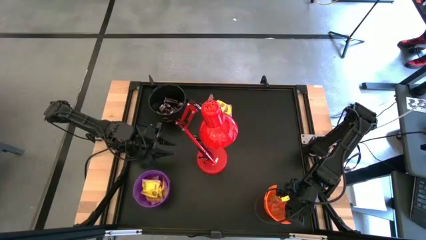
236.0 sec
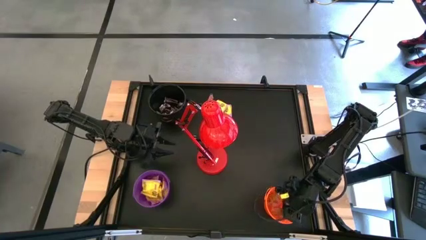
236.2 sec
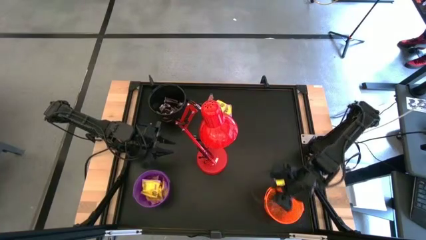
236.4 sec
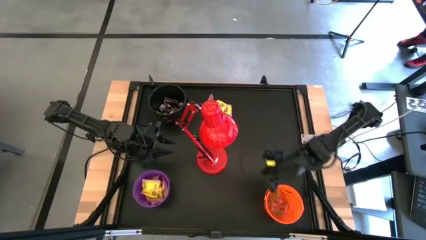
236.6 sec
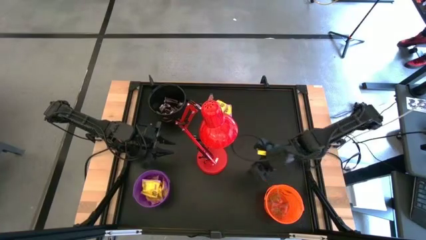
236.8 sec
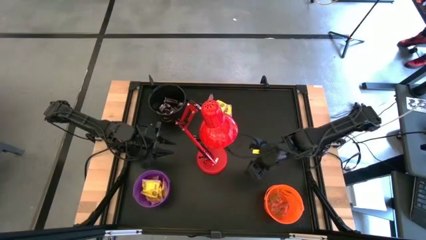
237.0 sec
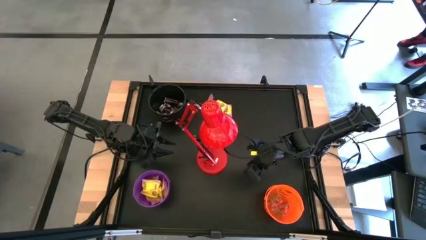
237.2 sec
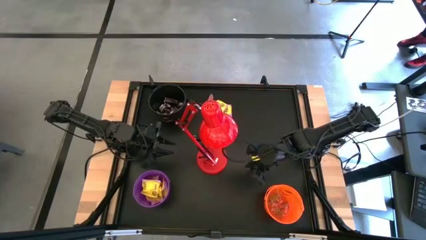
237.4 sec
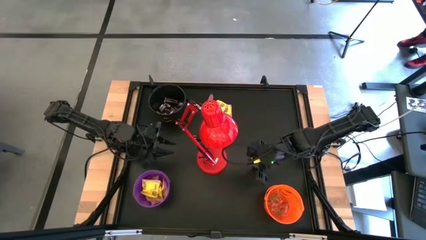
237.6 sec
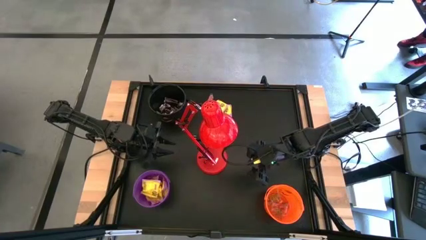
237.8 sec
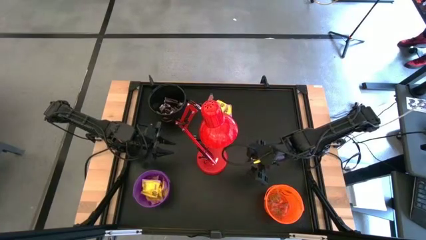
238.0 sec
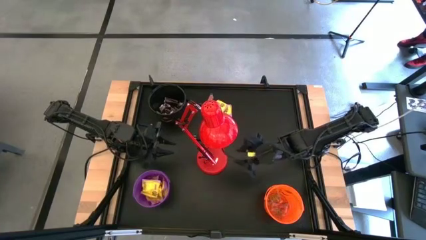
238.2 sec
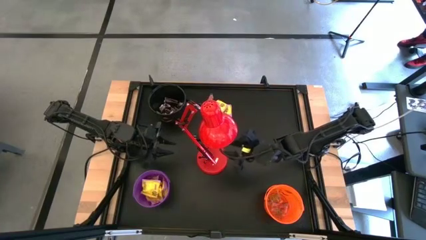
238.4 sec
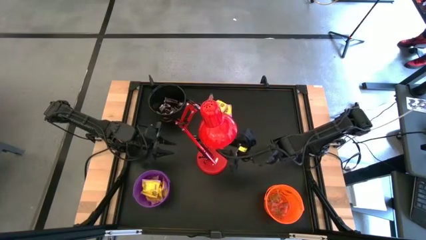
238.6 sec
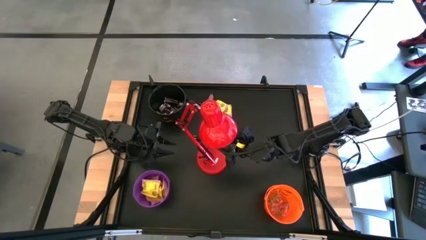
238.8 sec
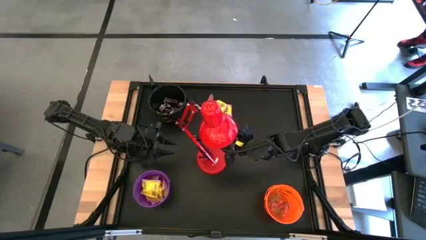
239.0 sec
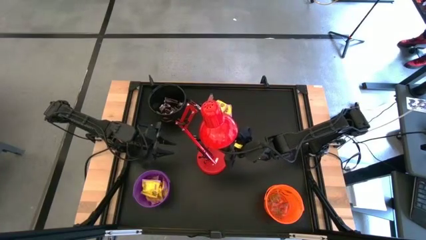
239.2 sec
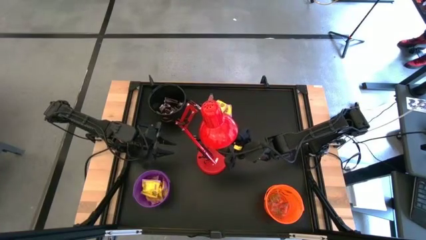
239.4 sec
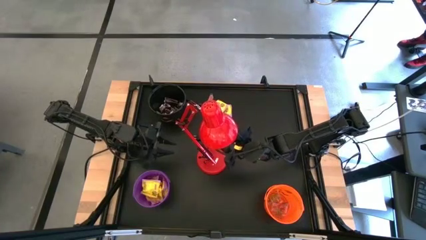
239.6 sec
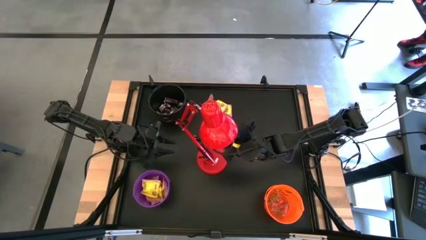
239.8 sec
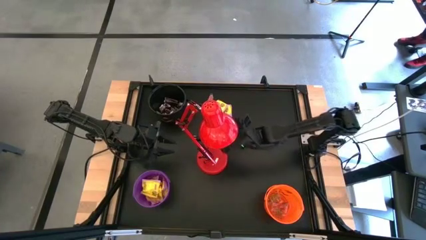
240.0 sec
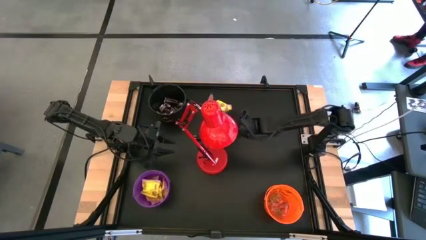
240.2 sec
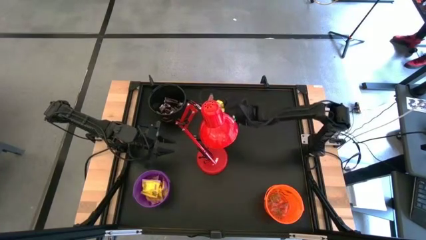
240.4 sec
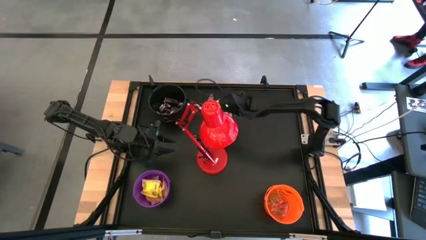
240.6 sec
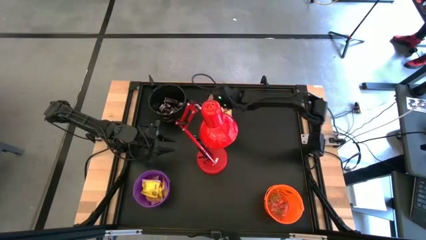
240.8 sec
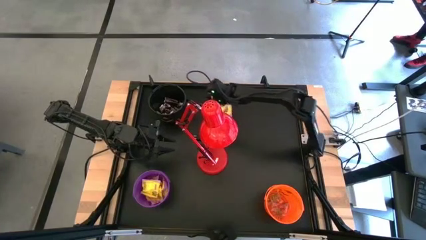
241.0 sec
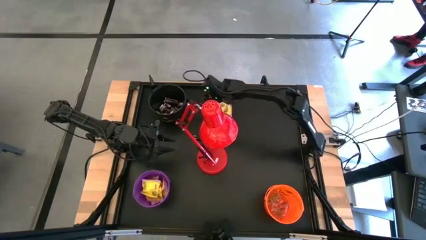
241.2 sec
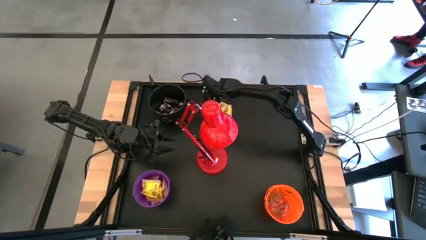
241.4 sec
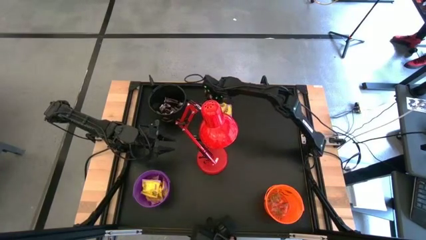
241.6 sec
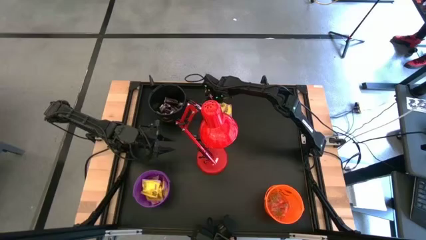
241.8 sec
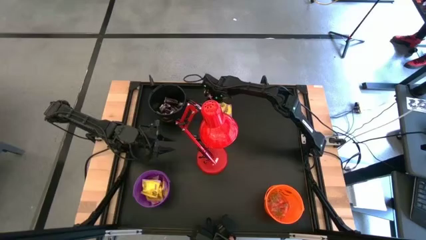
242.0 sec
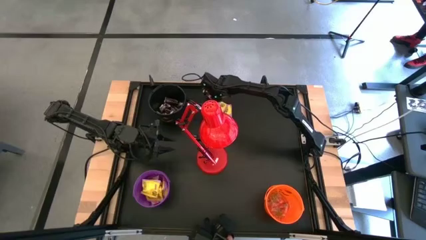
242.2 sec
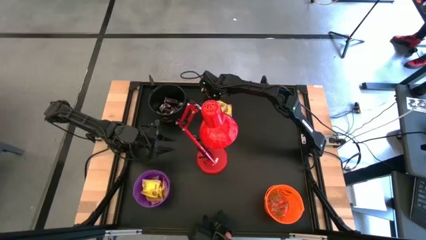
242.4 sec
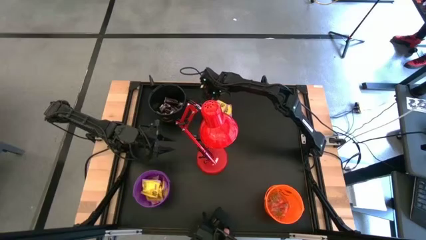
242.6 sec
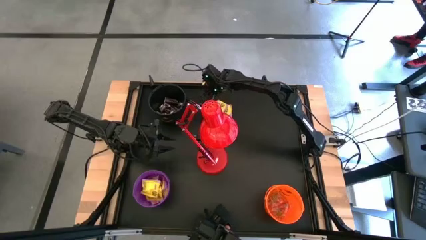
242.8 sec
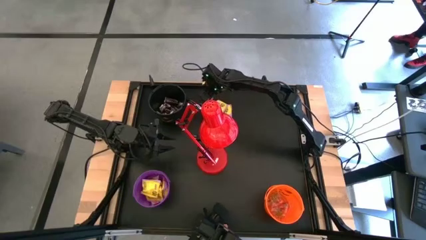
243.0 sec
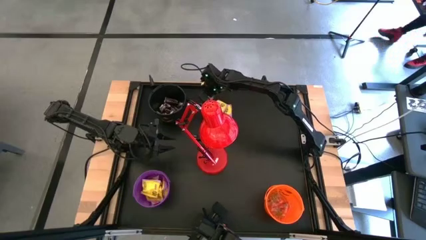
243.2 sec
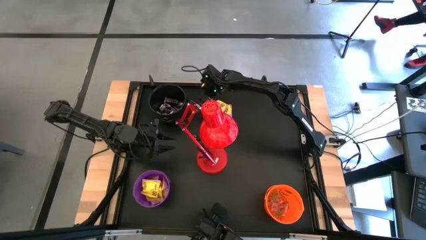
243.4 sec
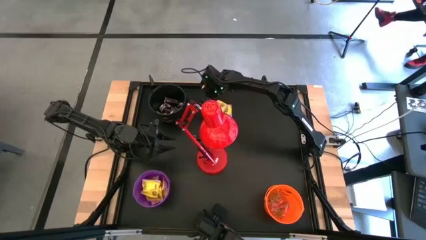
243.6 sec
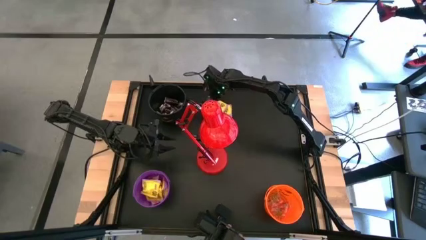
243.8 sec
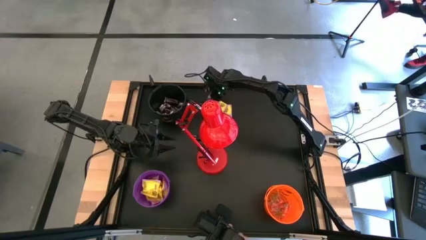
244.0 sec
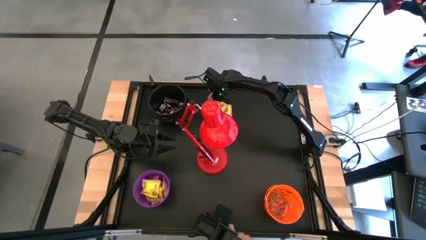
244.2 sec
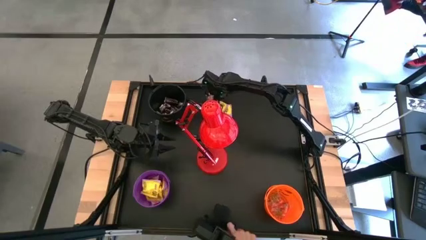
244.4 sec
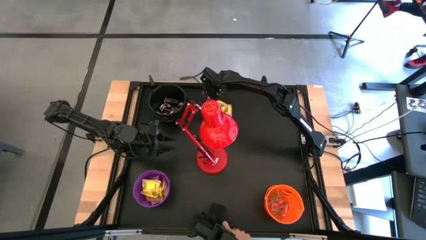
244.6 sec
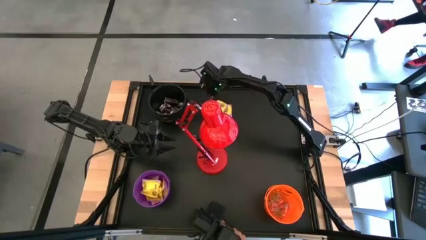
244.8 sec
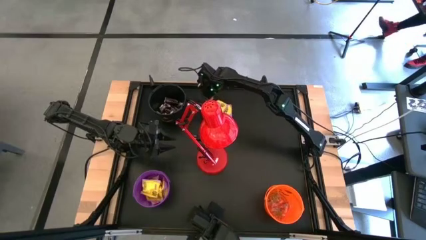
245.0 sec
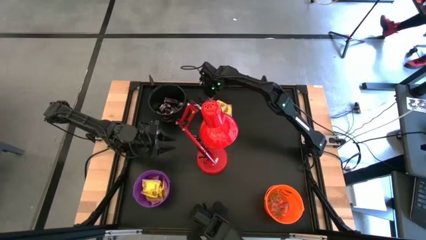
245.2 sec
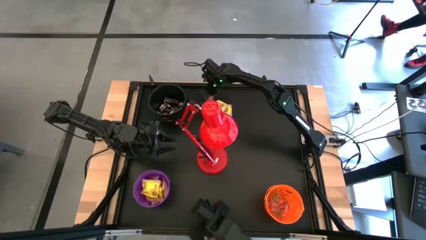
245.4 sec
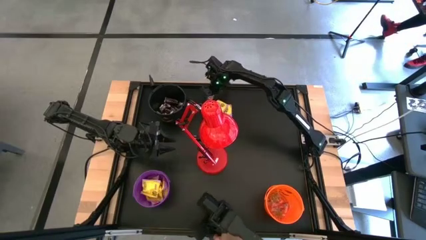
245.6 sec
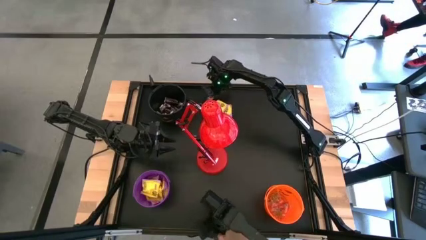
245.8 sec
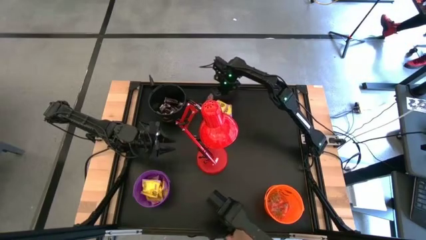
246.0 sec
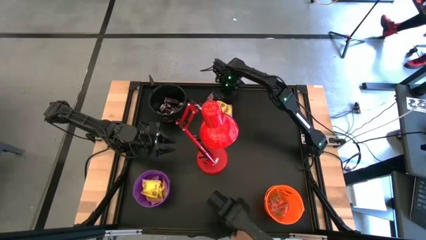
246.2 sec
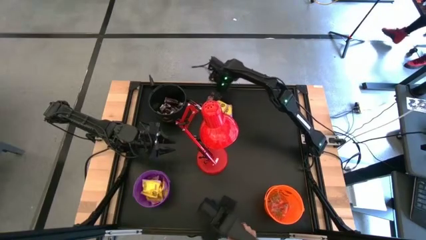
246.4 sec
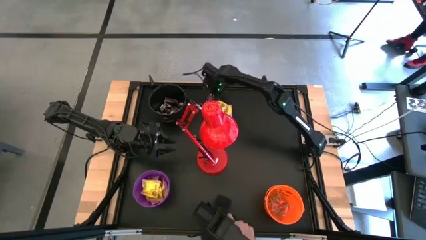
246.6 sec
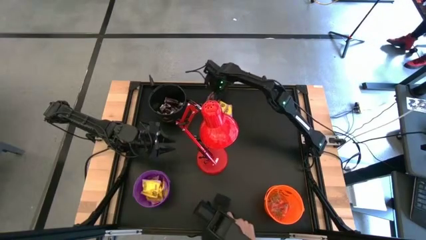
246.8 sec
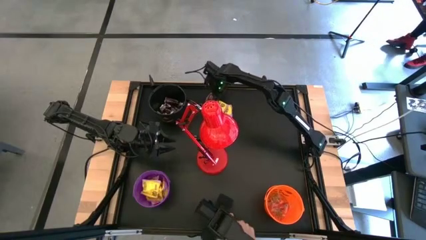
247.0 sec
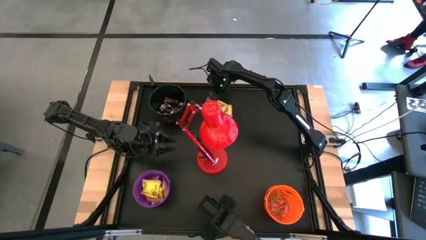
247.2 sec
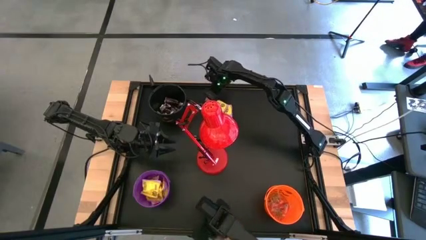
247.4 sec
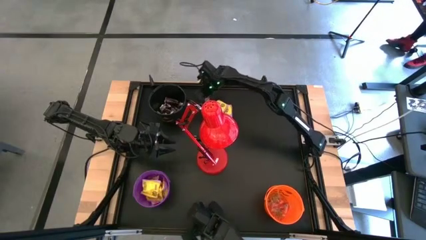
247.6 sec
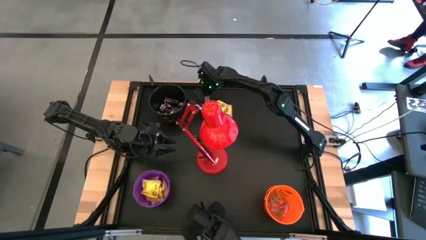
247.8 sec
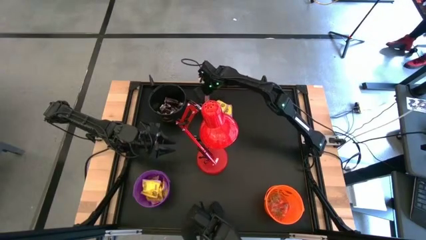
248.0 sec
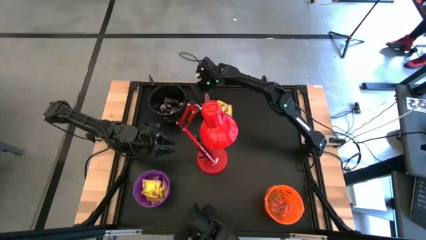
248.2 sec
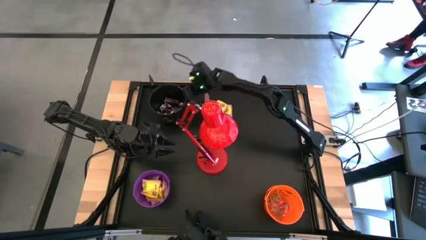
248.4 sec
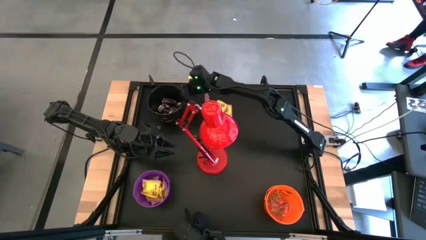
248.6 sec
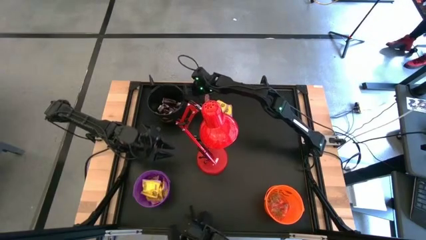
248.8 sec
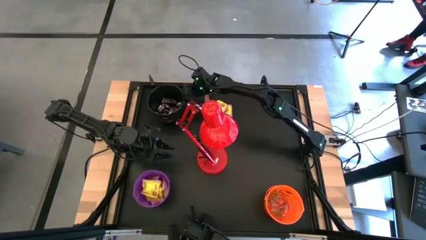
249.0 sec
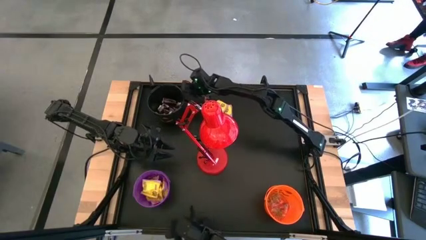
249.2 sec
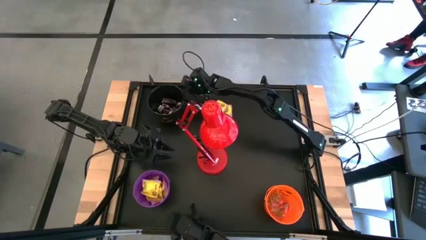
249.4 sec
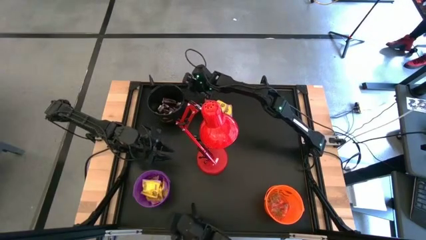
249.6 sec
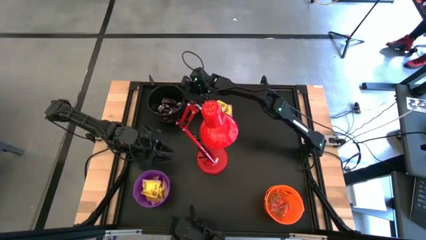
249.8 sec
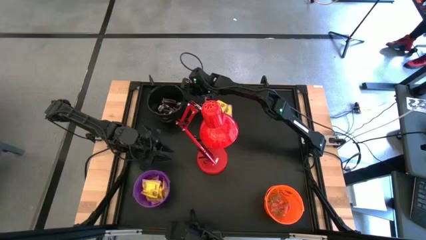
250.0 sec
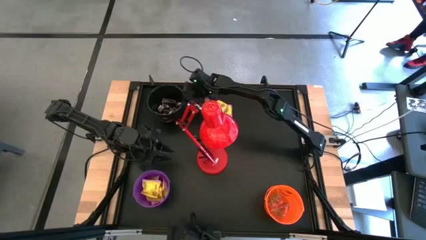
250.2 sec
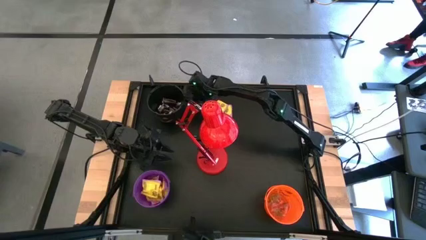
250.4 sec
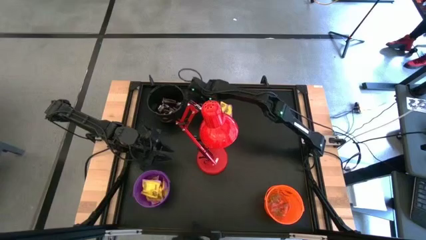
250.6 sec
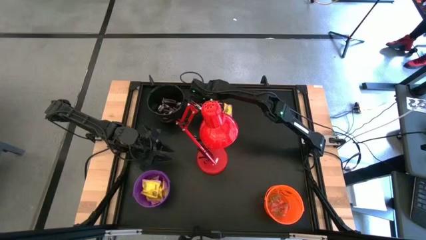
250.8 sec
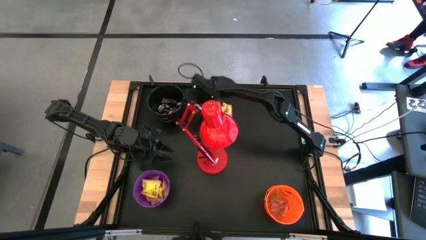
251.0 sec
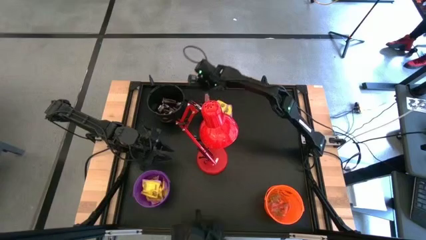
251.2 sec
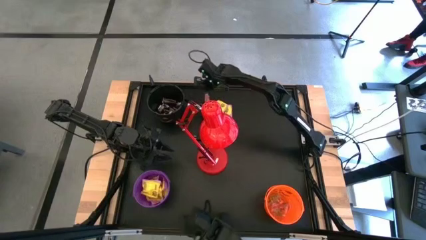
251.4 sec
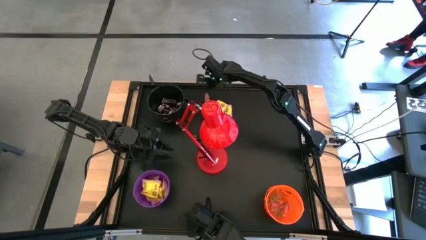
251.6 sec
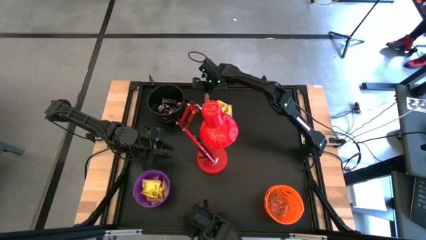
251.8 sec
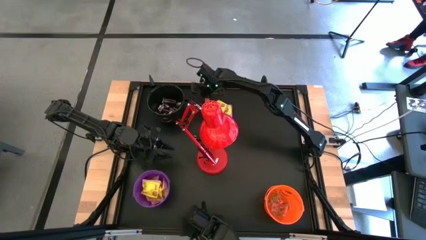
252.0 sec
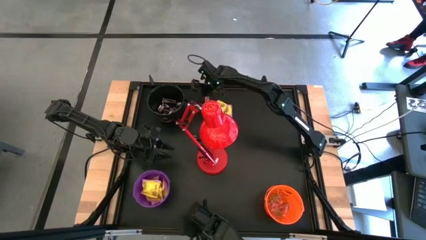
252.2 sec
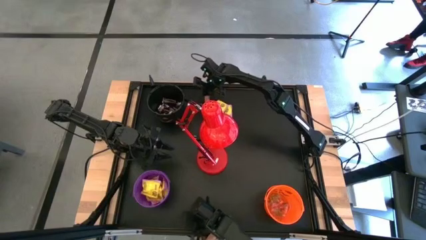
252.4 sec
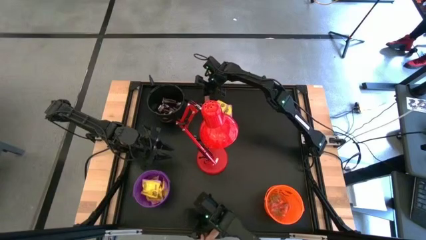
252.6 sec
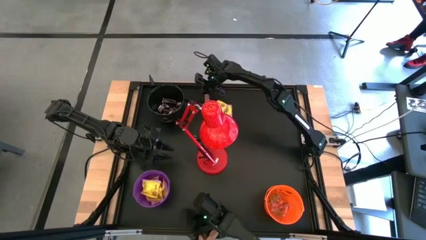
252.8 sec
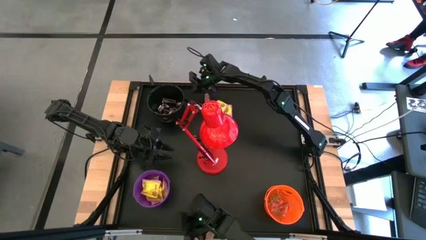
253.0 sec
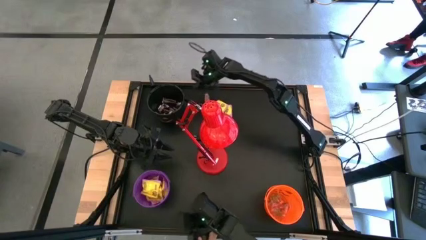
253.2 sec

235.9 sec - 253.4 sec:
Task: Organize candy in baskets
Put the orange gummy into the orange bucket
